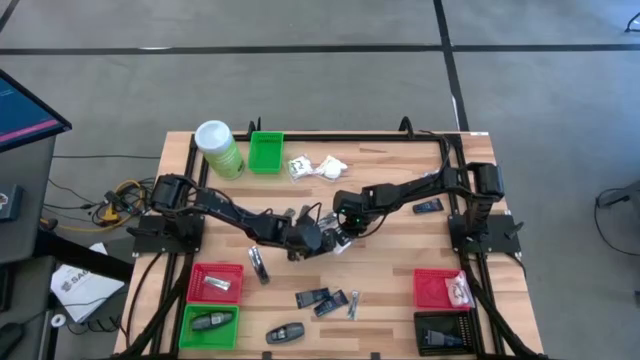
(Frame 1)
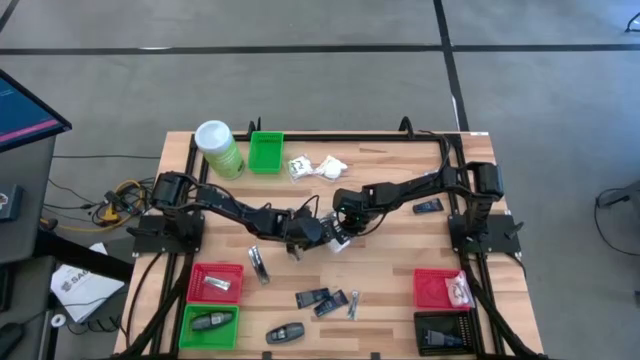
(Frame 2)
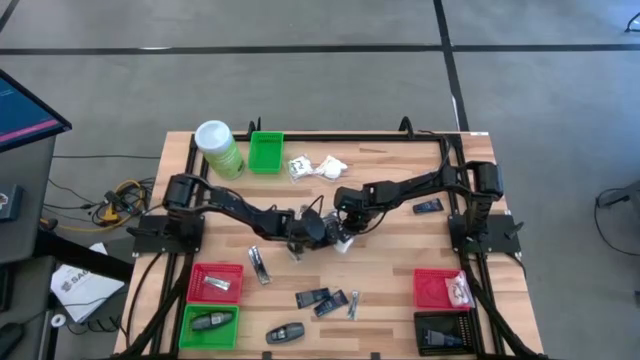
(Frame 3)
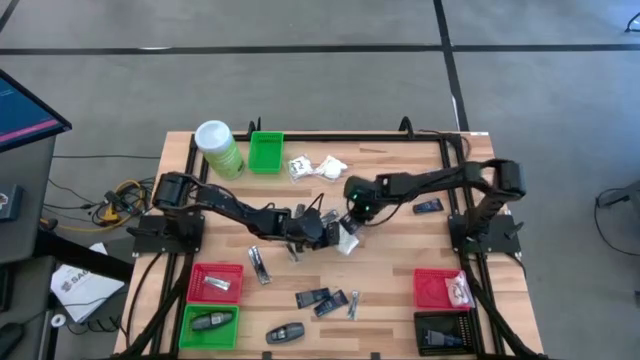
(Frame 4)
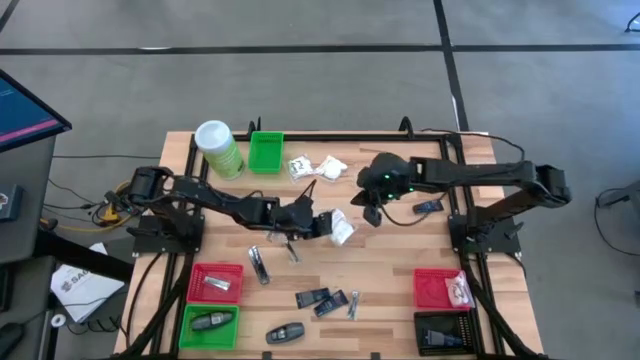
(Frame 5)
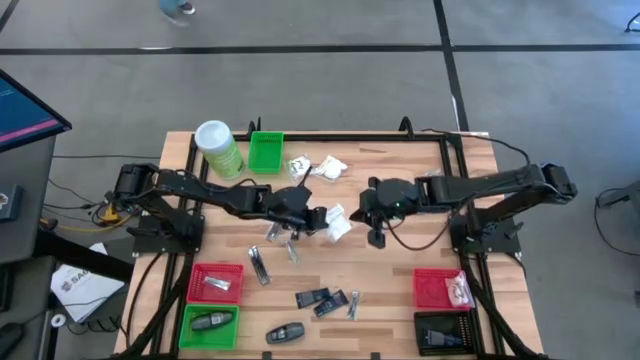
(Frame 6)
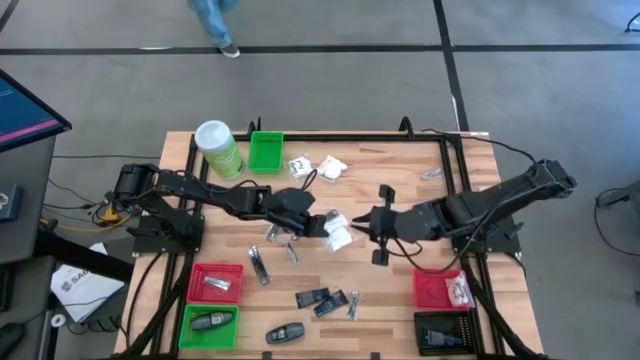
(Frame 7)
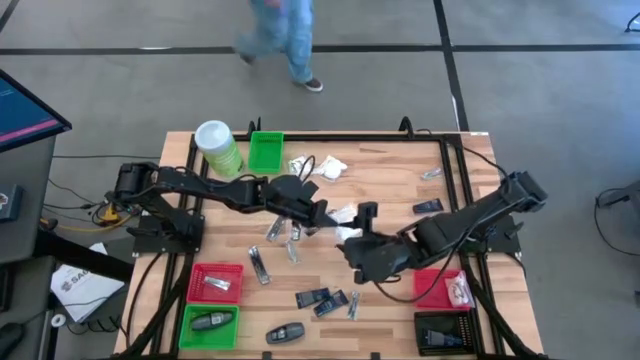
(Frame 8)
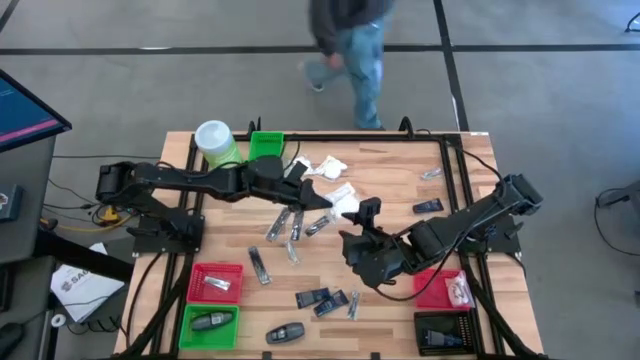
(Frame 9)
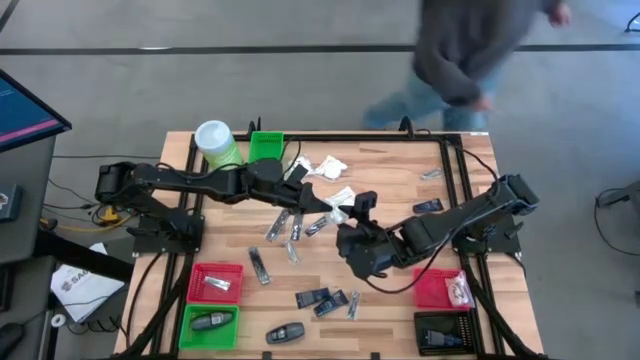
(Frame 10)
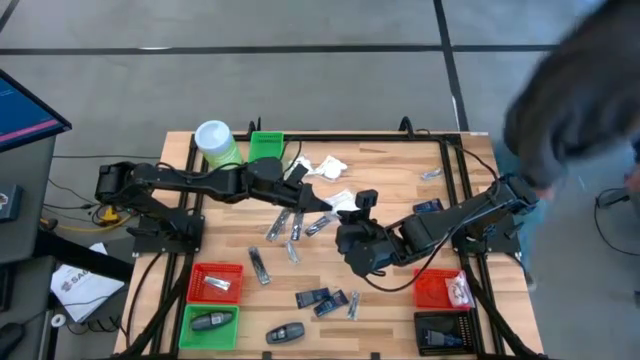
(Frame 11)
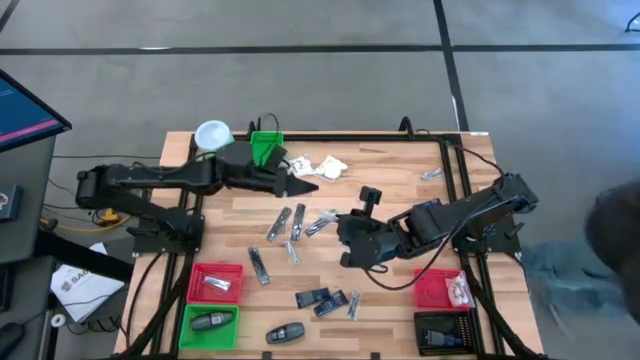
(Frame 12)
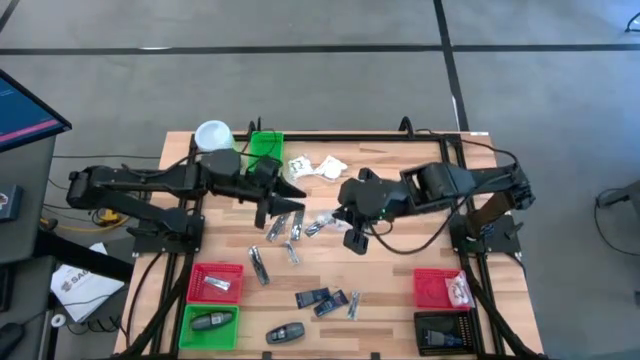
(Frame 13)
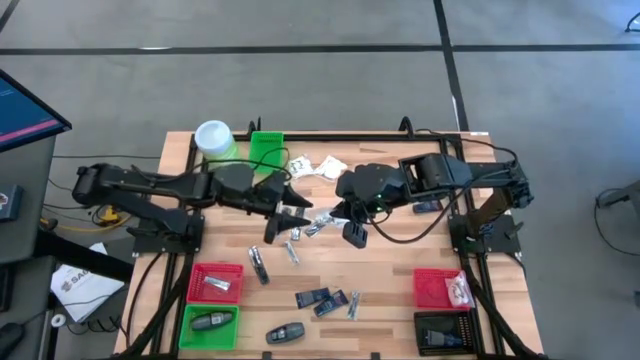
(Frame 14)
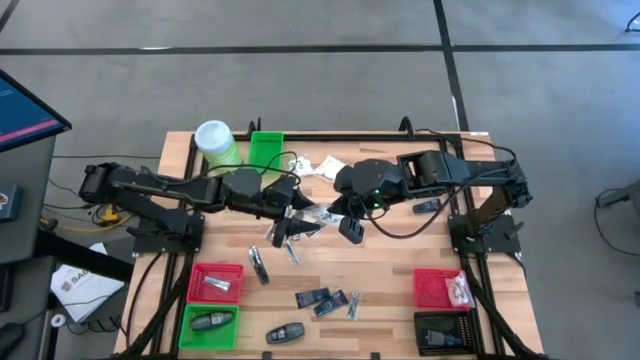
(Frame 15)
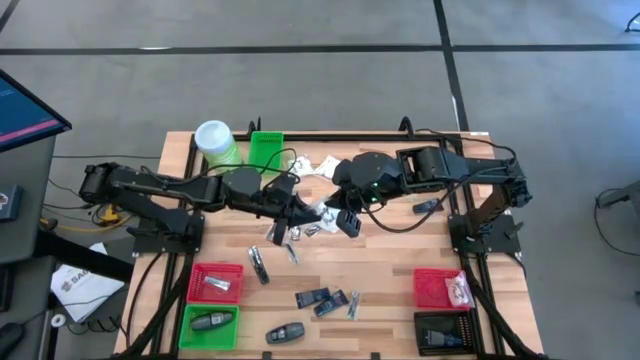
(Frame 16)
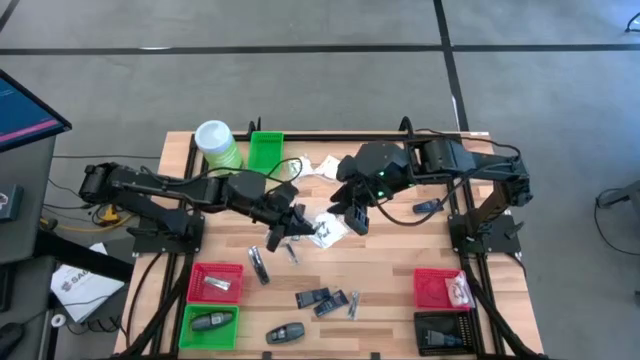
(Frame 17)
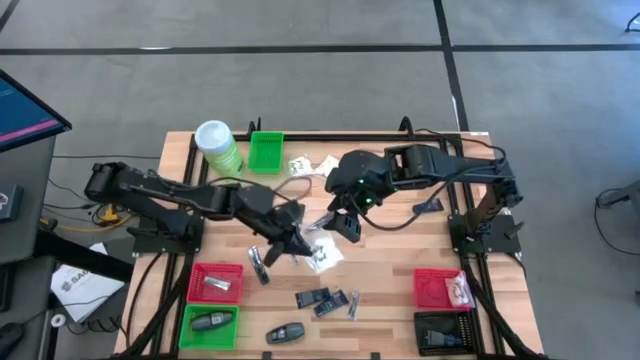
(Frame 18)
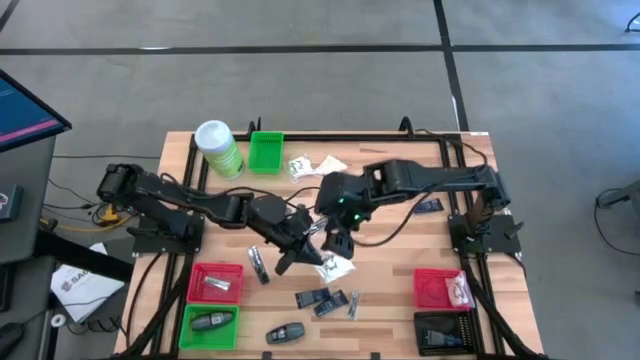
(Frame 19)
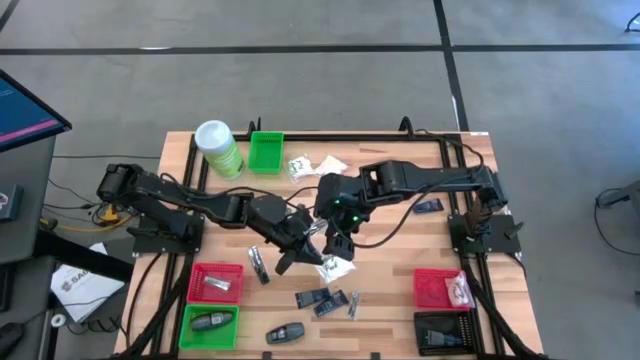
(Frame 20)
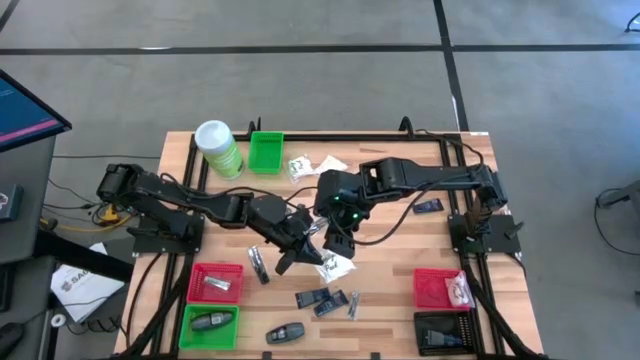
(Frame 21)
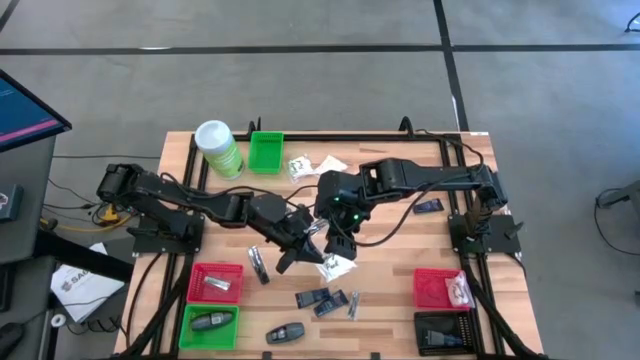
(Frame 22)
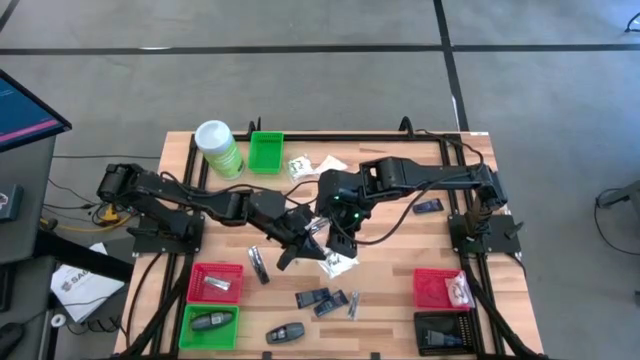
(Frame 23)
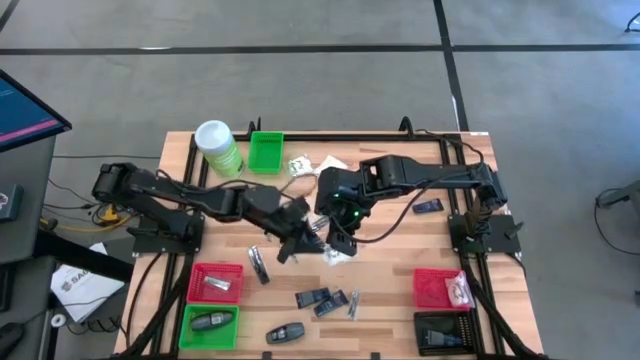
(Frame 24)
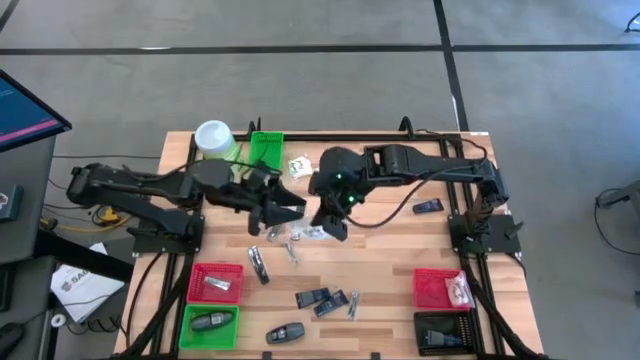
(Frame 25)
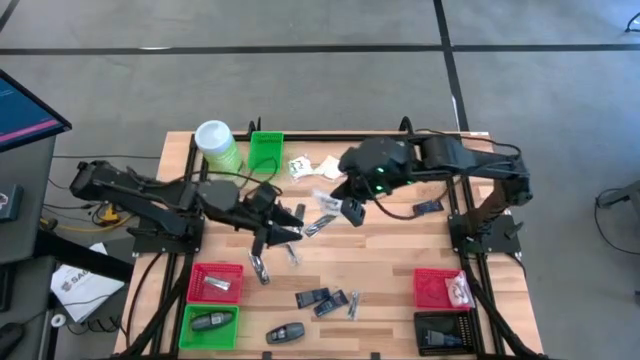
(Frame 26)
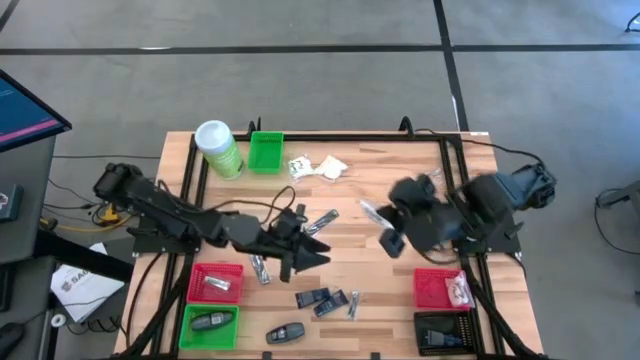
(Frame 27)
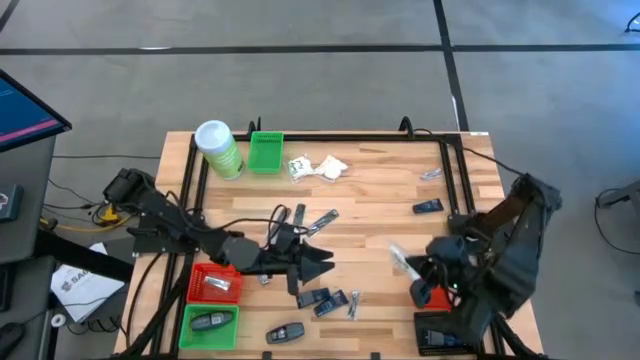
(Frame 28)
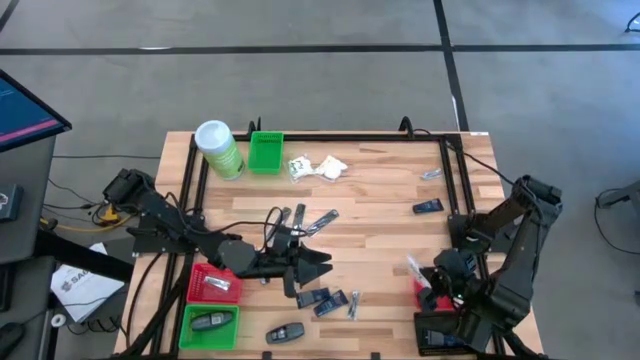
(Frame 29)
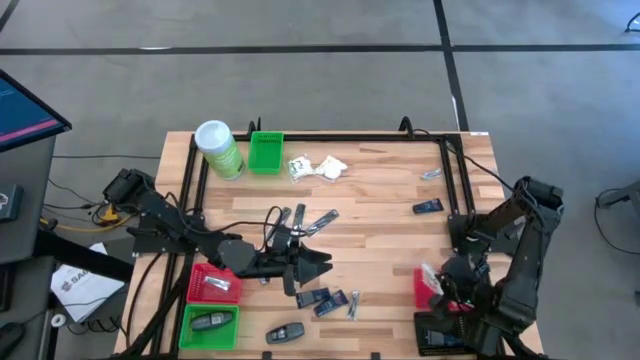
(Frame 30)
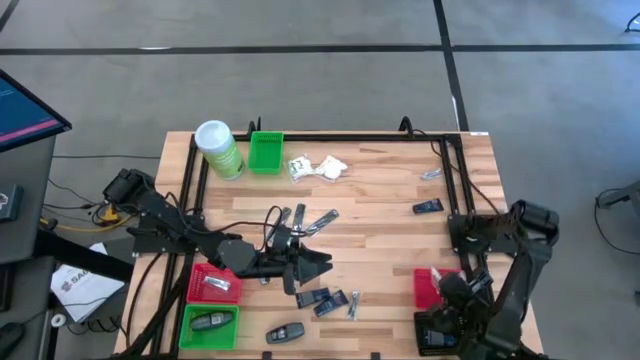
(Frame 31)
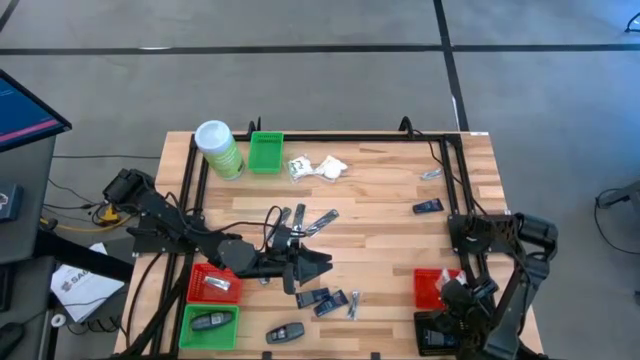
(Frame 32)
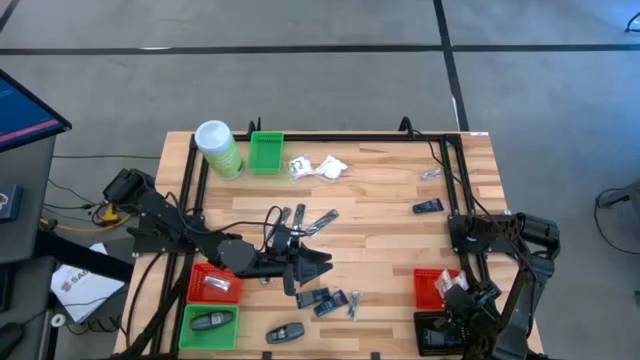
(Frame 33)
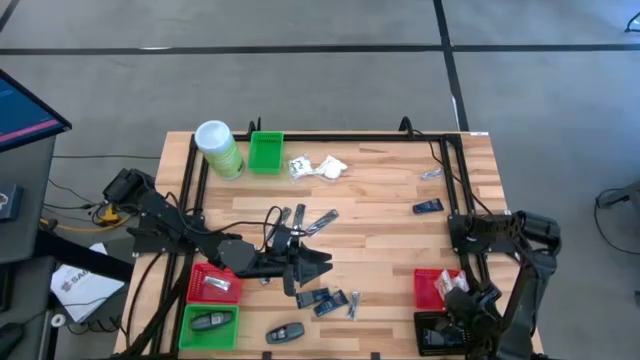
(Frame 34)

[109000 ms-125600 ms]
Task: Pick & Place Travel size toiletries
Put the cotton pack into the right red bin

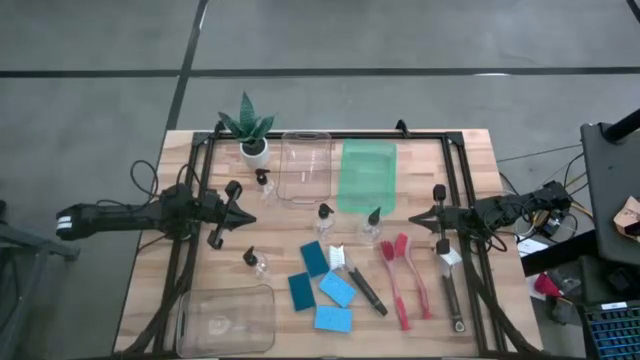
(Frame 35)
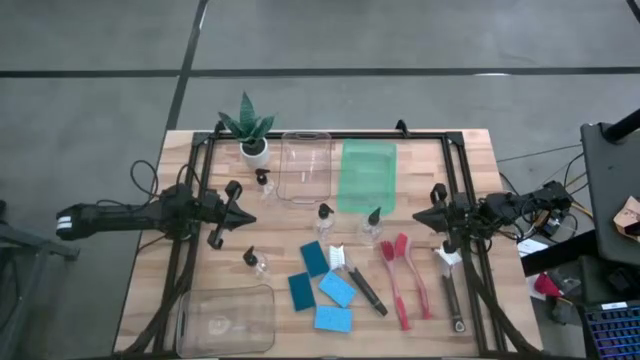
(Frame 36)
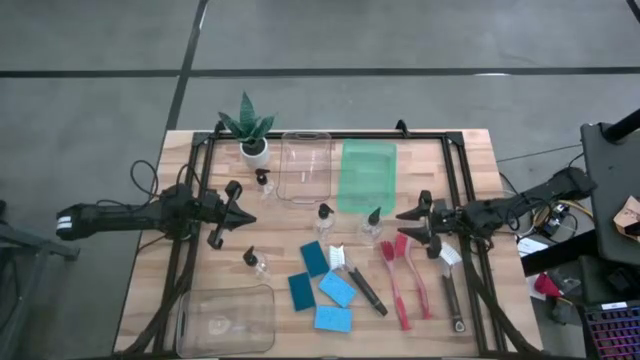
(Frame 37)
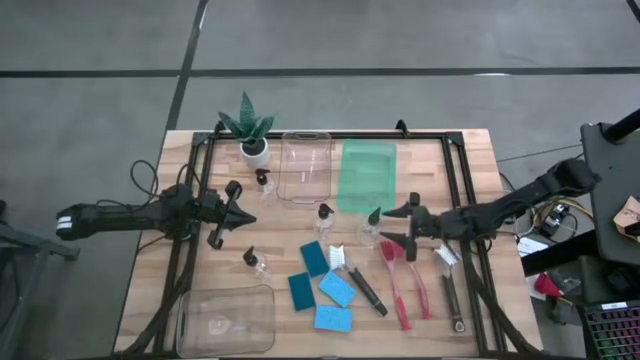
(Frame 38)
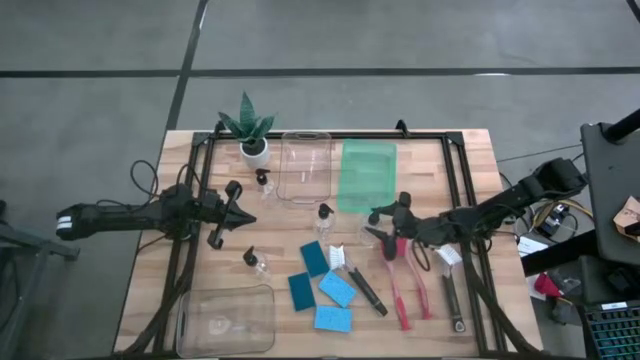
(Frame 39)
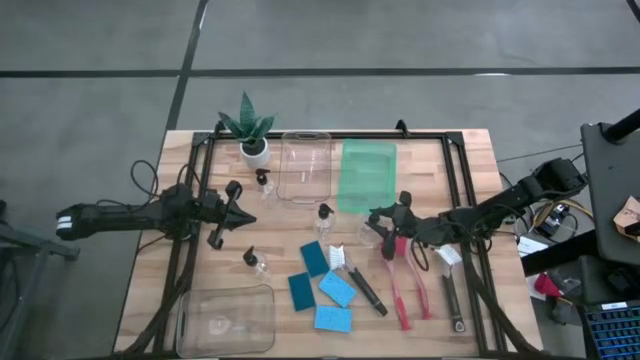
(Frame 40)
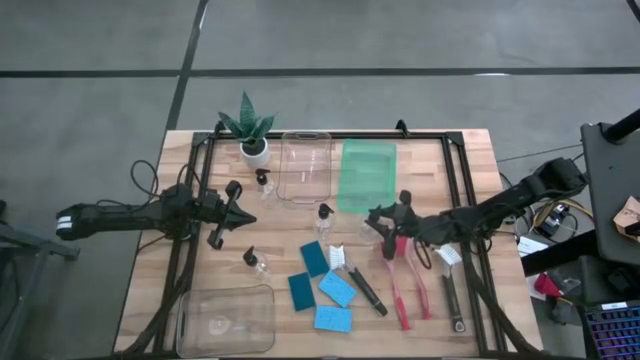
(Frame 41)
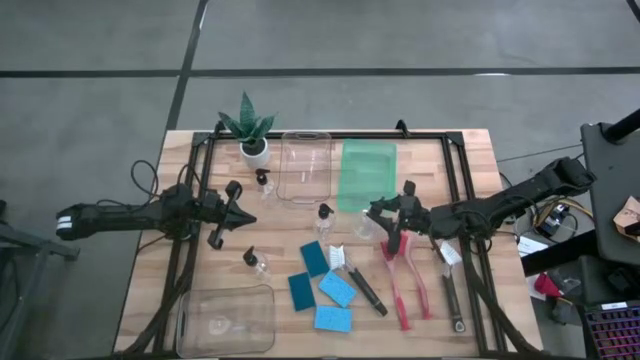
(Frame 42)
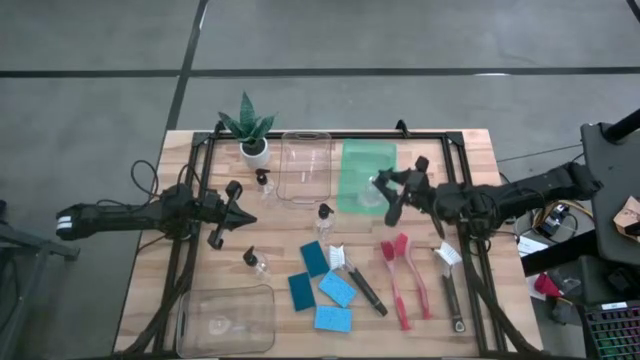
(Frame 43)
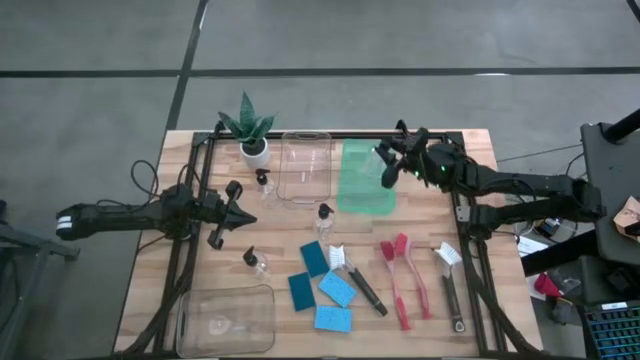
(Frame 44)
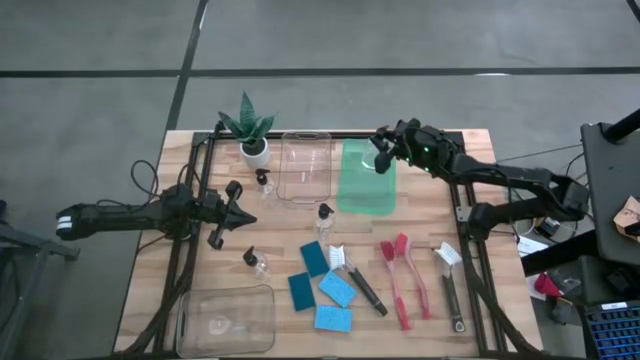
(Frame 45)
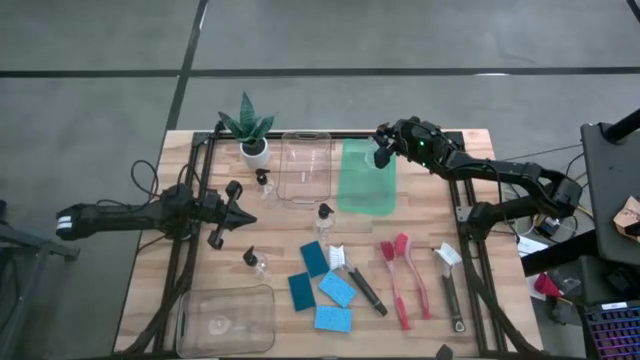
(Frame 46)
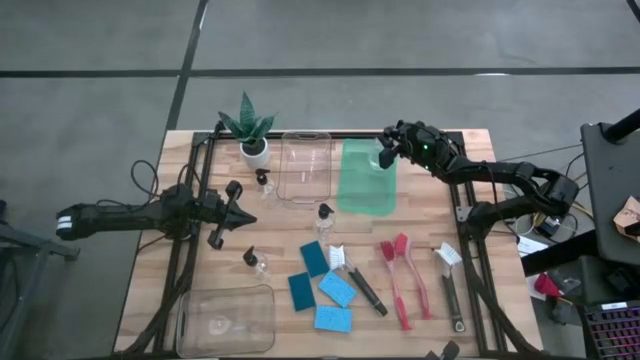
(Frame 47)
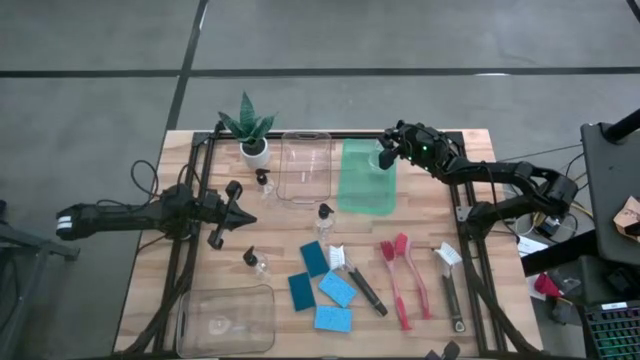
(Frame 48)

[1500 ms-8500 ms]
Task: Pick & Place Kitchen Sink Supplies
Put the transparent soap dispenser into the green bin
